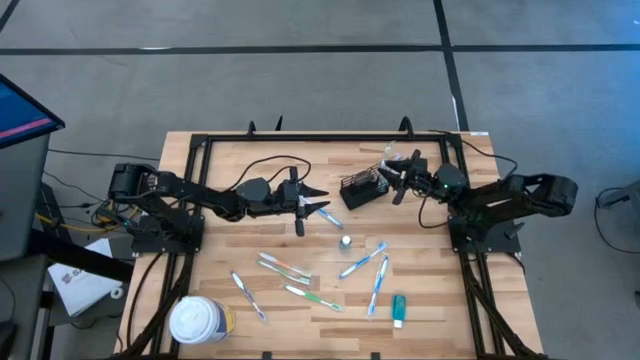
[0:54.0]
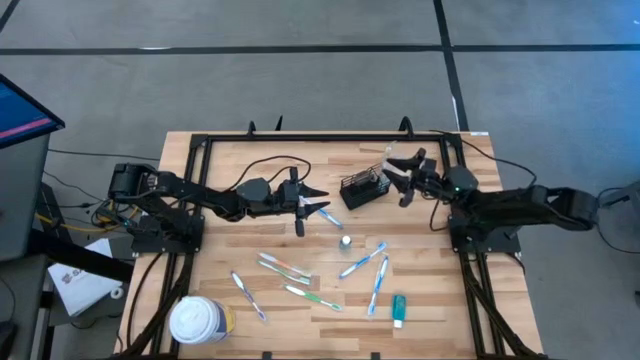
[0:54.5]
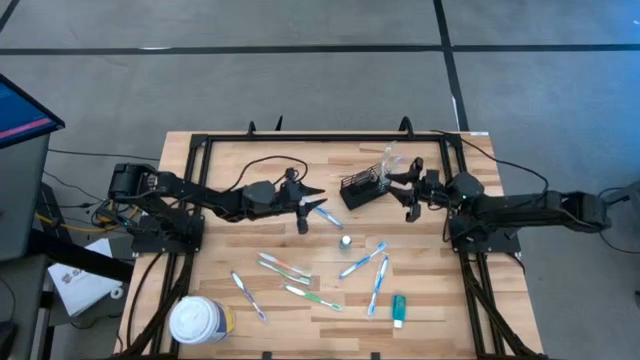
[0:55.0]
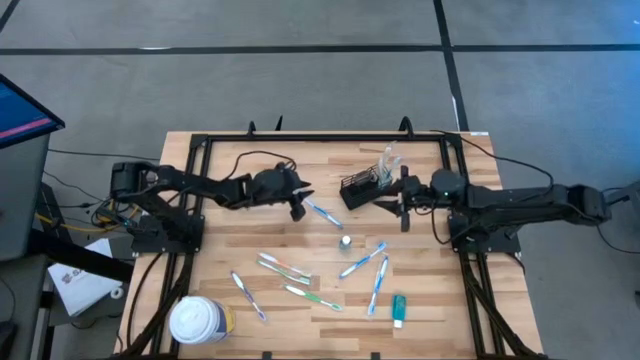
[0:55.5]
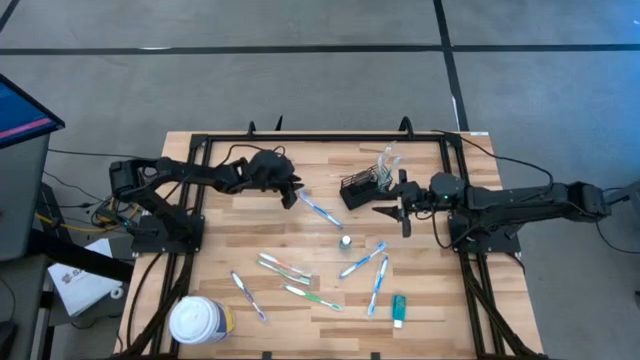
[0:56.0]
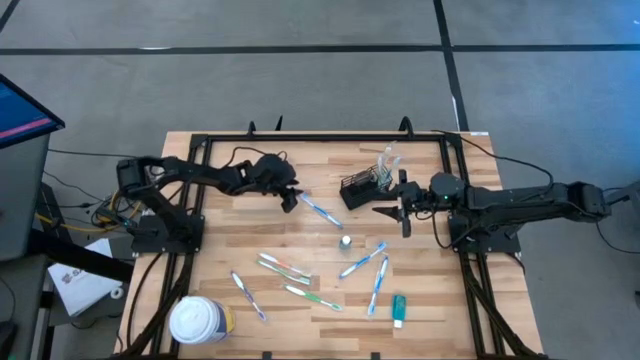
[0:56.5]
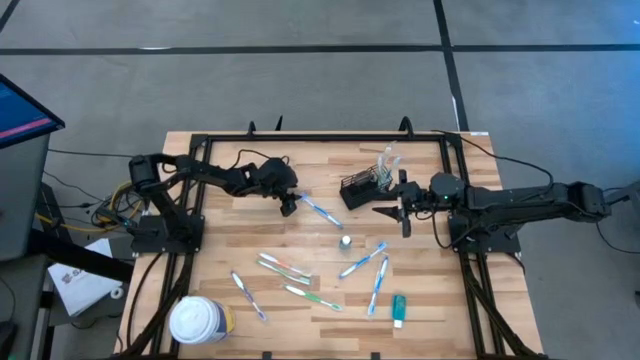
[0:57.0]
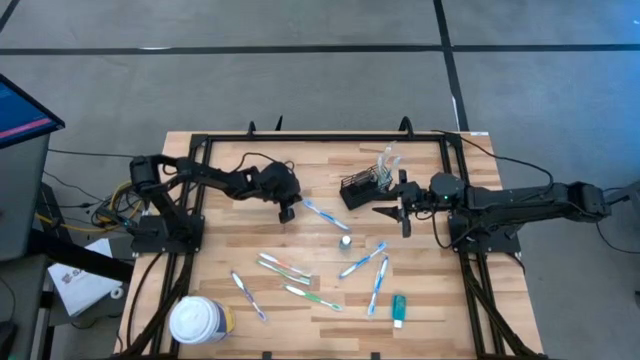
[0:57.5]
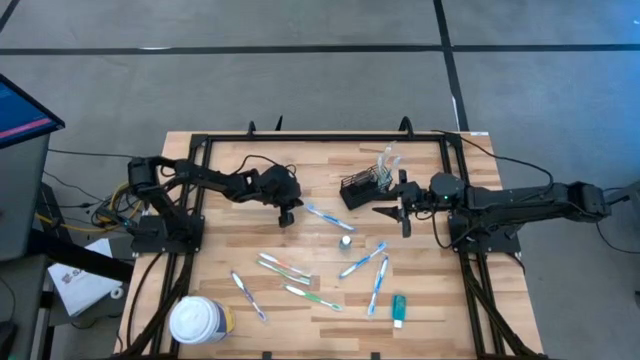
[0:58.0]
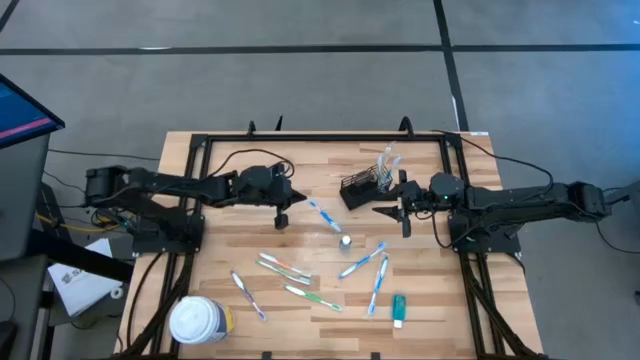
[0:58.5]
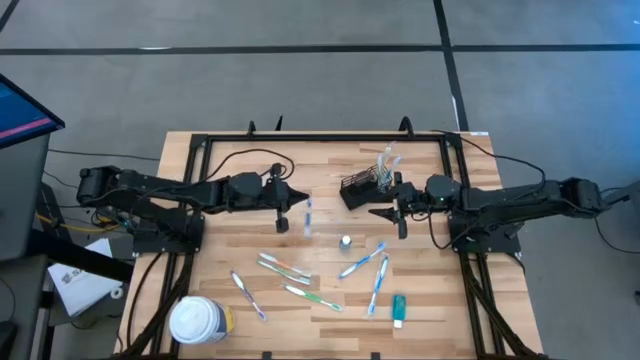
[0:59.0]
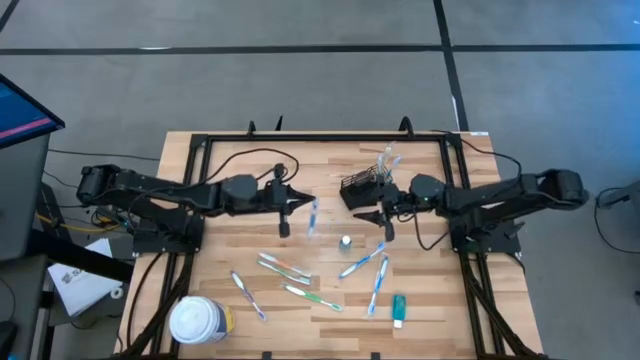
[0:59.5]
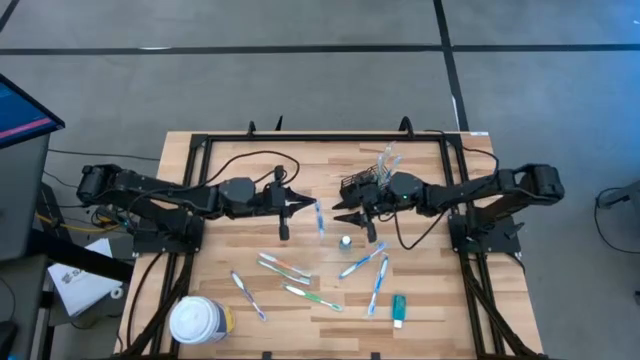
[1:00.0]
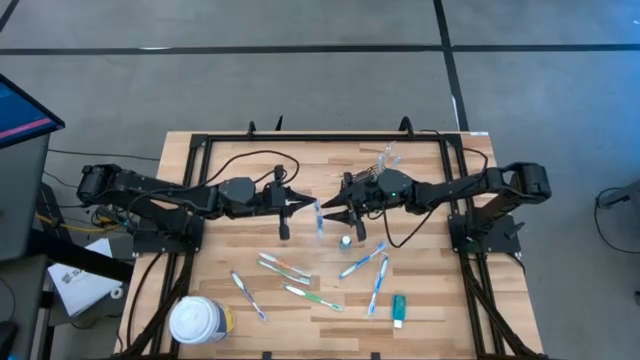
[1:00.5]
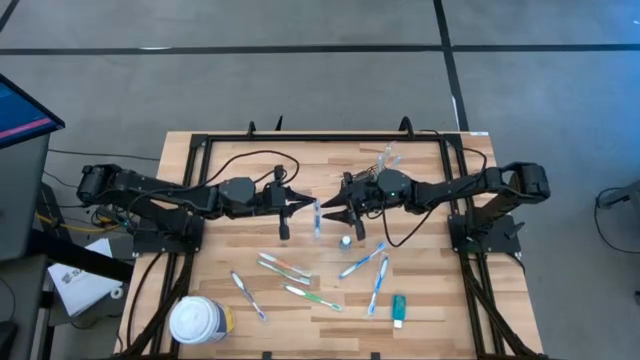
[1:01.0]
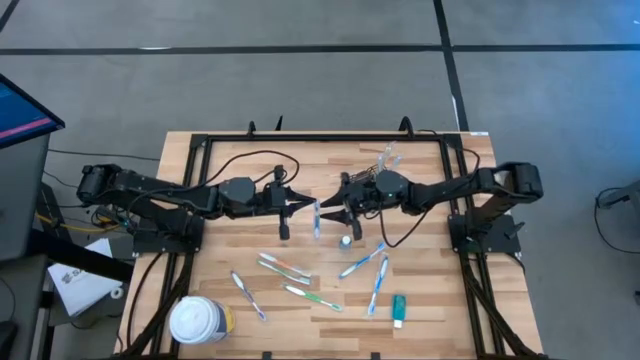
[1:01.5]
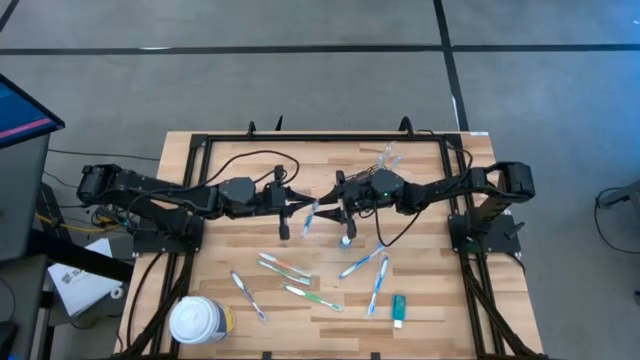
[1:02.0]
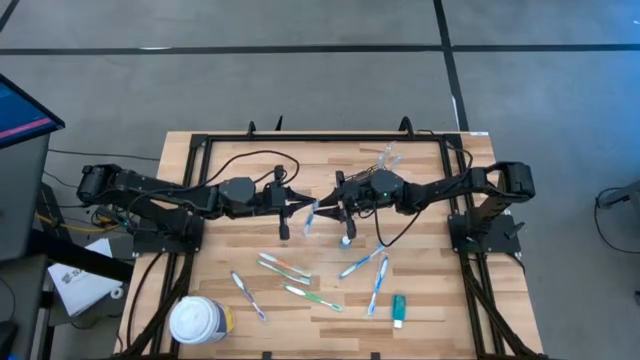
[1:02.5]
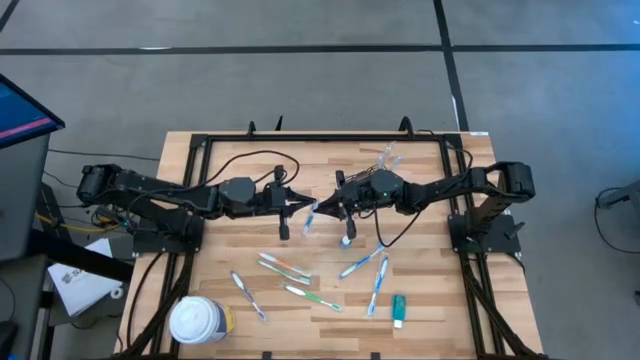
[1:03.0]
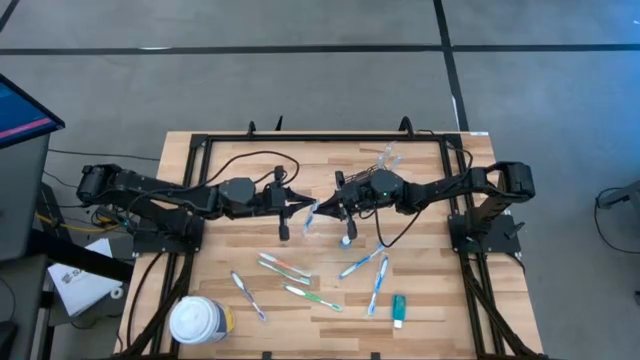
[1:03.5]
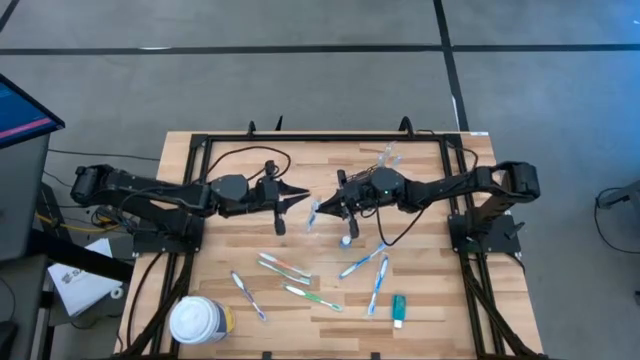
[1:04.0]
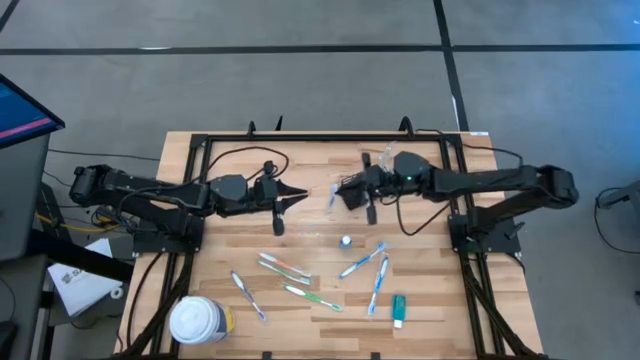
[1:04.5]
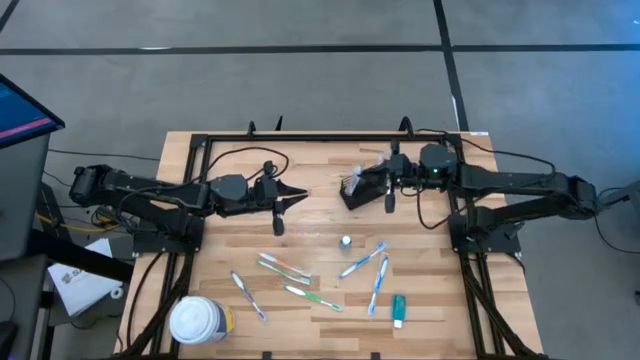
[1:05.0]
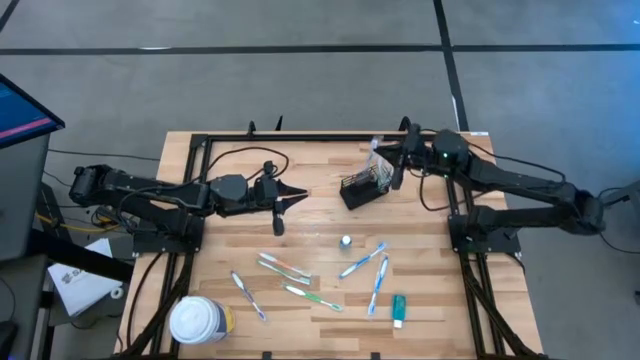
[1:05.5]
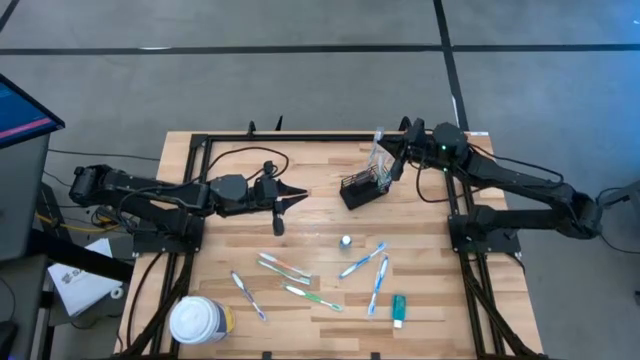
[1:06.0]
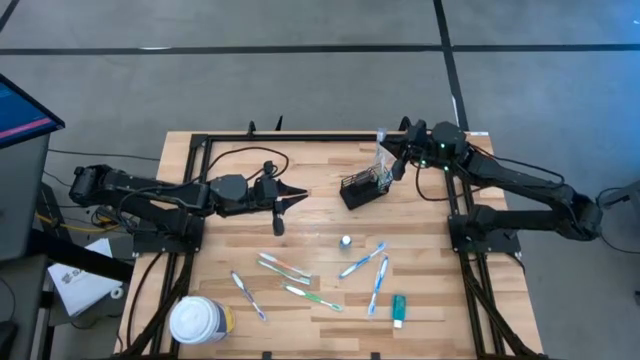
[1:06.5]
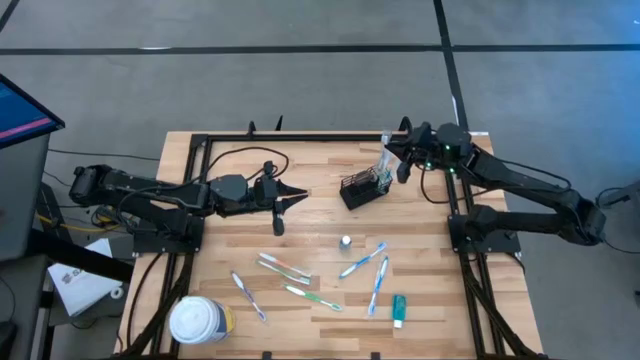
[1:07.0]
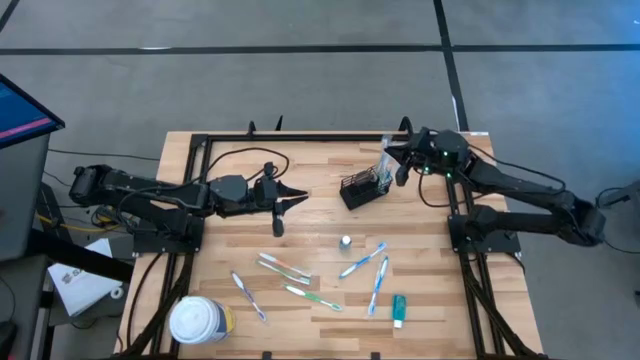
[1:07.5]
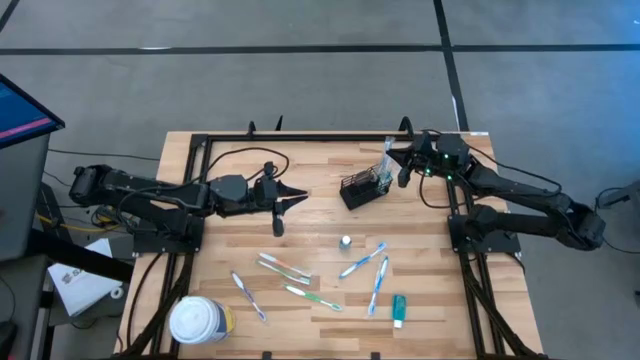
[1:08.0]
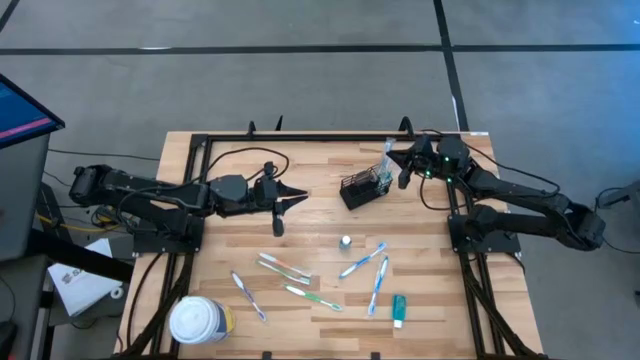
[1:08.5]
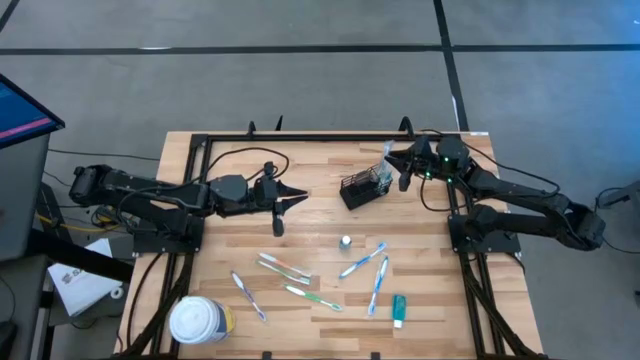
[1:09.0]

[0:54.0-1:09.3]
Task: Pick & Place toothbrushing station
Put the blue toothbrush into the mesh organizer

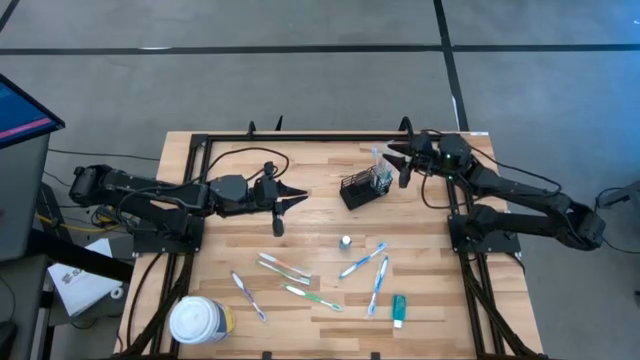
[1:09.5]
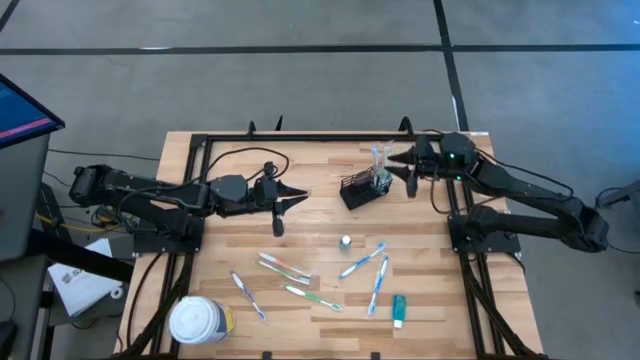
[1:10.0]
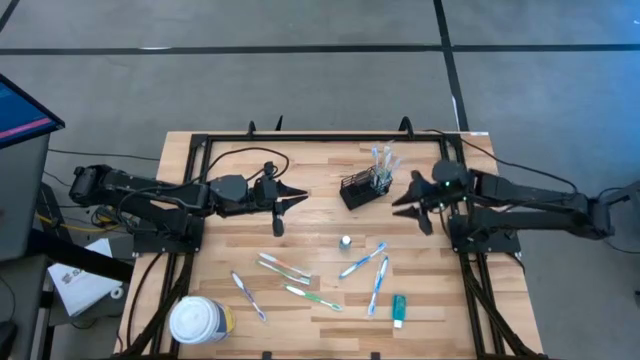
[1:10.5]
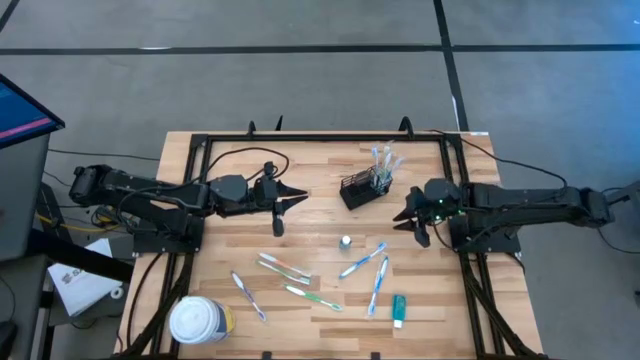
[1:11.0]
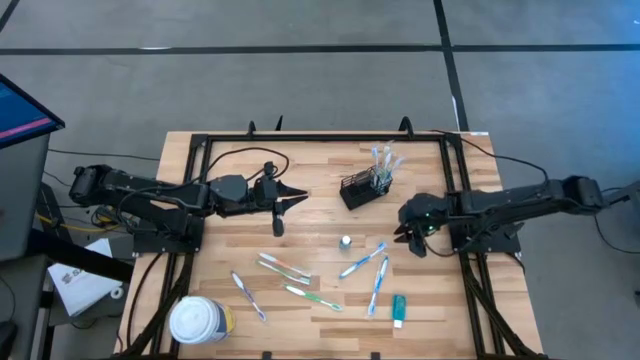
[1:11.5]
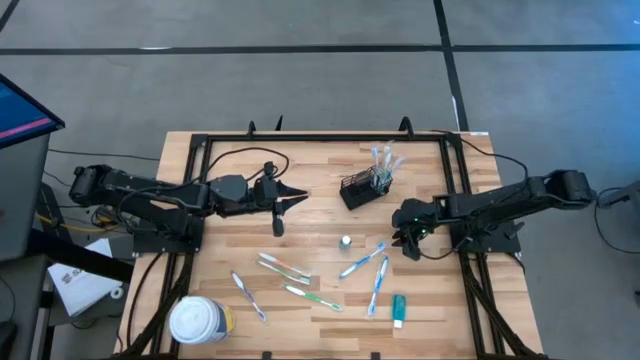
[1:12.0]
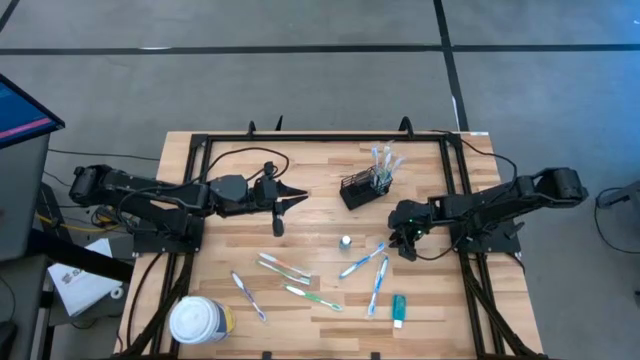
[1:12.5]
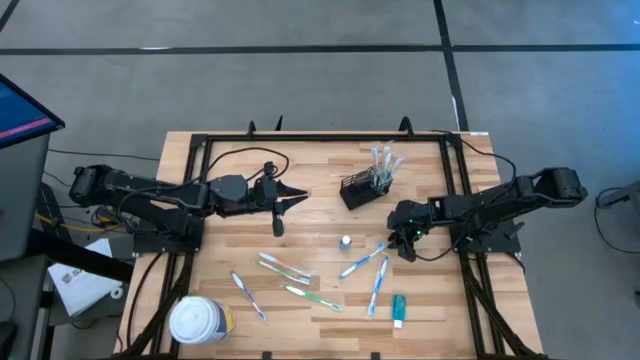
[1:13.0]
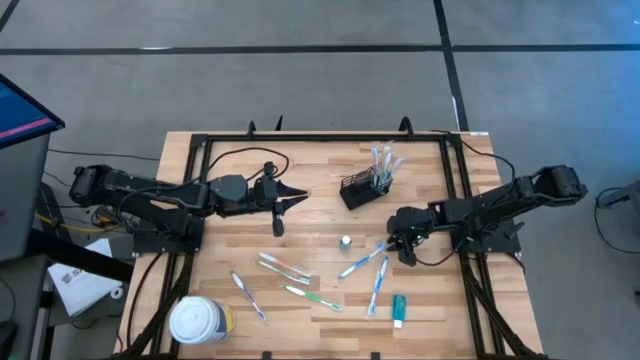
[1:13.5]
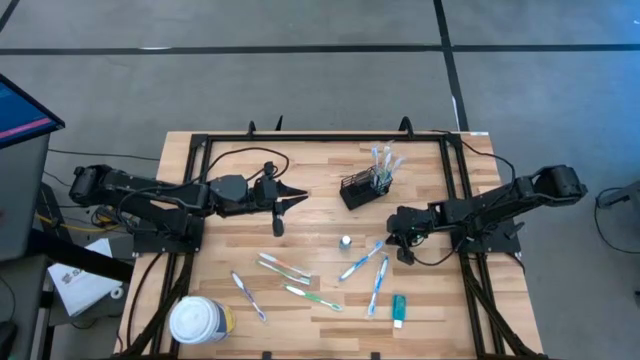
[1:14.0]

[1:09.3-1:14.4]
Put the blue toothbrush into the mesh organizer

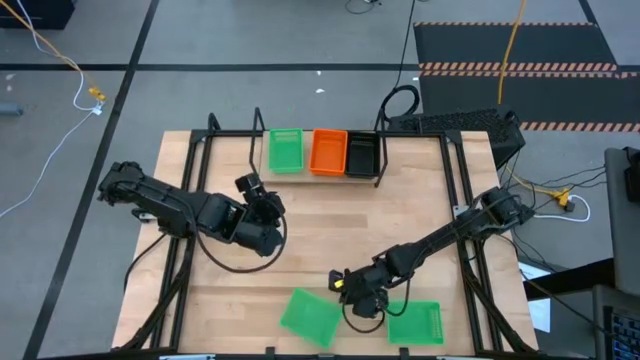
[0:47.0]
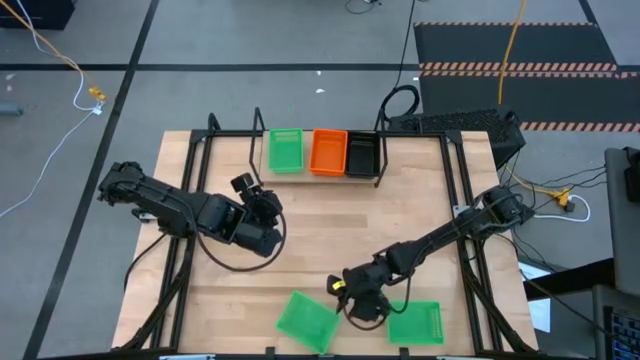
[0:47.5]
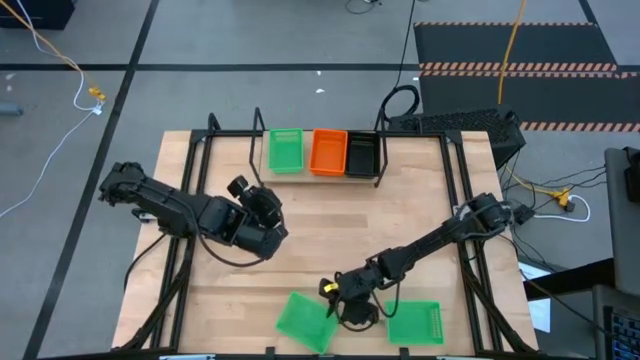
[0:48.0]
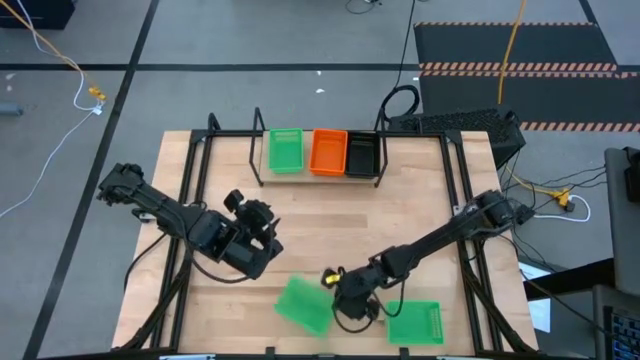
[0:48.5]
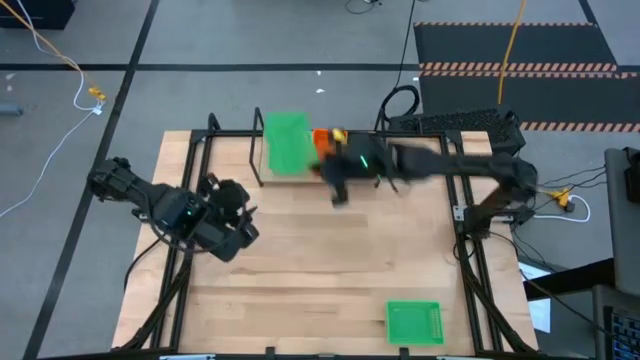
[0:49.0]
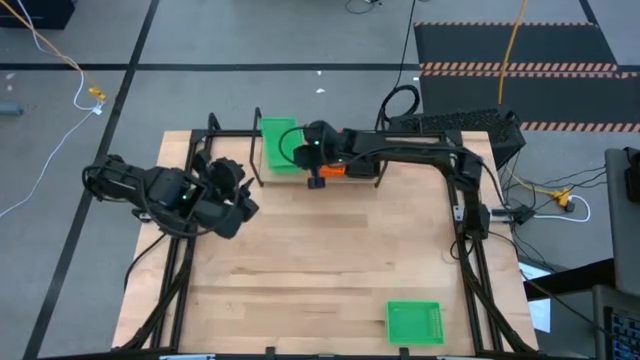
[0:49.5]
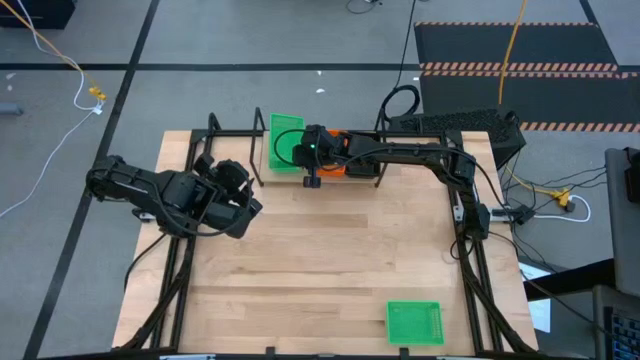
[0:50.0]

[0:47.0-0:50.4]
Task: Stack baskets on shelf by color
Stack the left green bin on top of the green bin on the shelf
